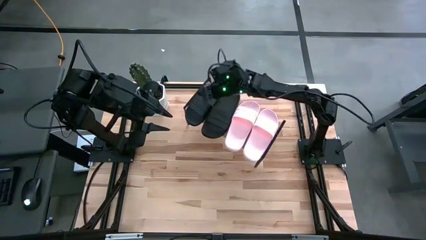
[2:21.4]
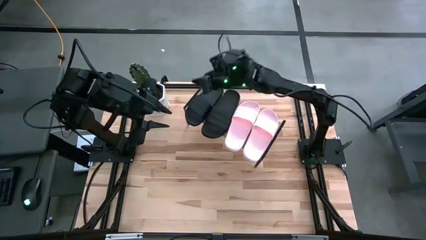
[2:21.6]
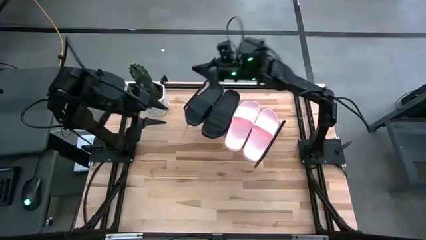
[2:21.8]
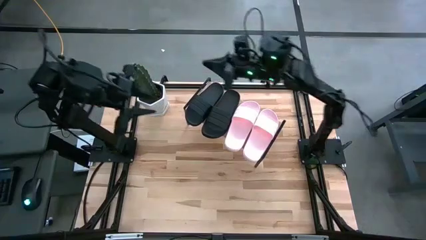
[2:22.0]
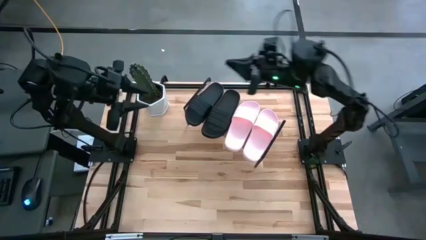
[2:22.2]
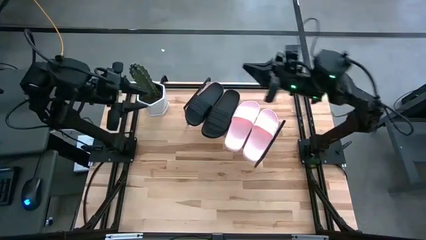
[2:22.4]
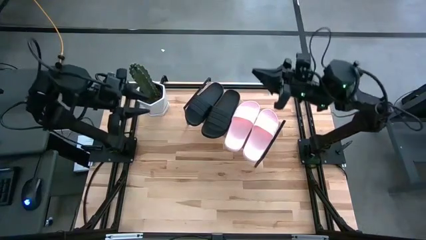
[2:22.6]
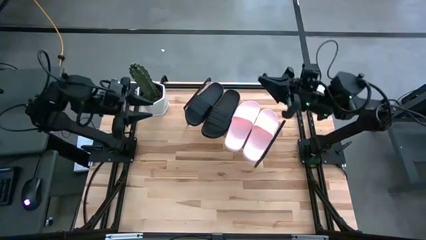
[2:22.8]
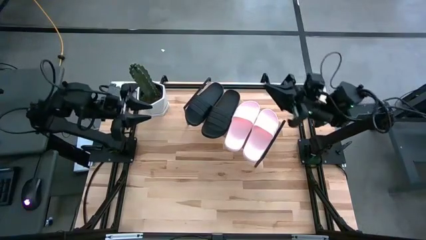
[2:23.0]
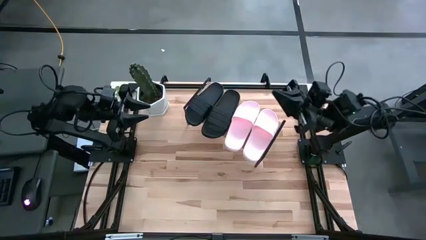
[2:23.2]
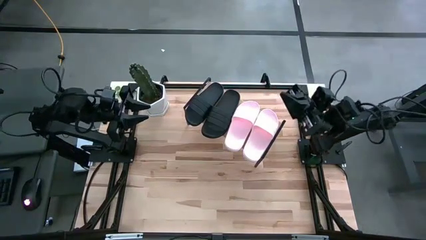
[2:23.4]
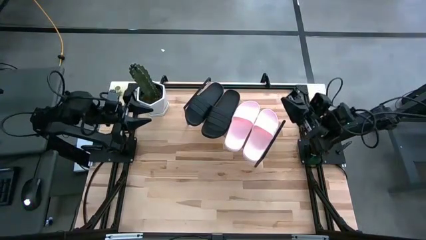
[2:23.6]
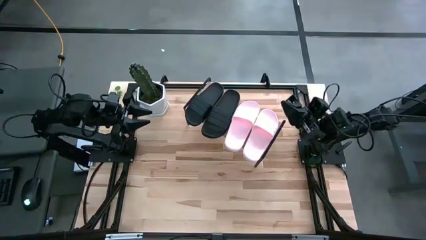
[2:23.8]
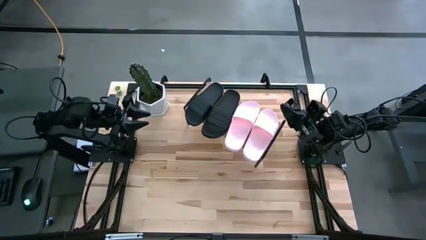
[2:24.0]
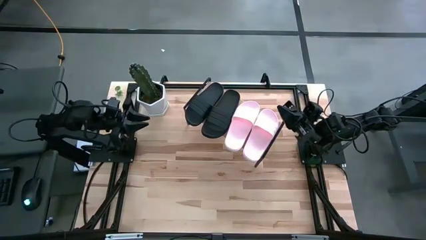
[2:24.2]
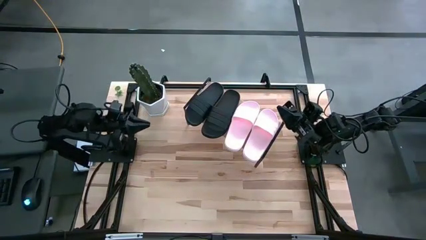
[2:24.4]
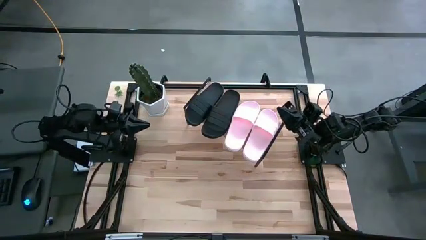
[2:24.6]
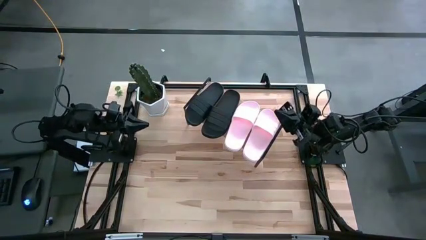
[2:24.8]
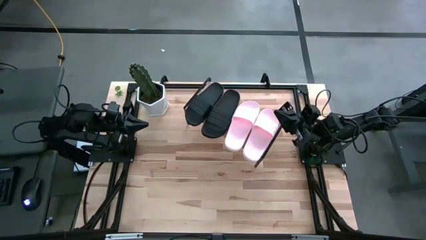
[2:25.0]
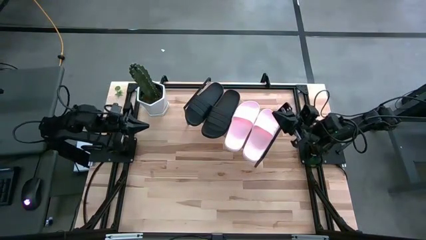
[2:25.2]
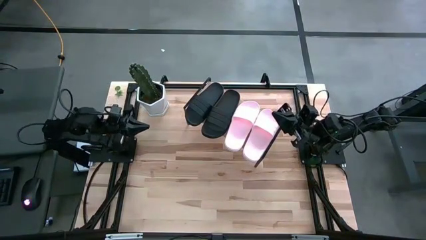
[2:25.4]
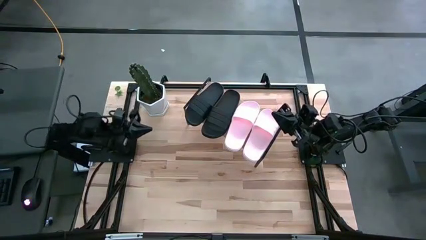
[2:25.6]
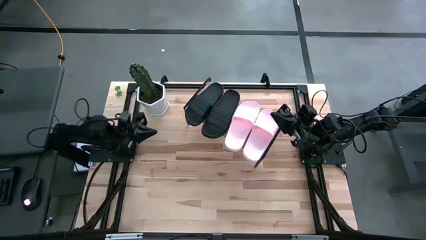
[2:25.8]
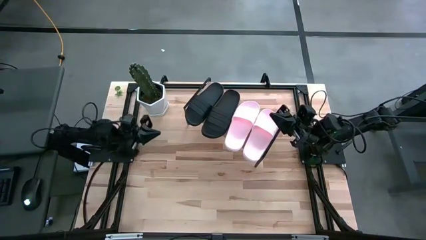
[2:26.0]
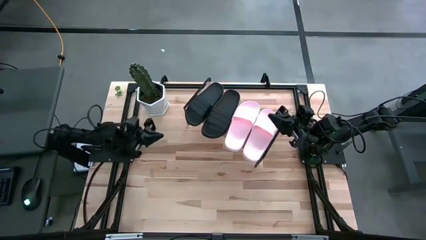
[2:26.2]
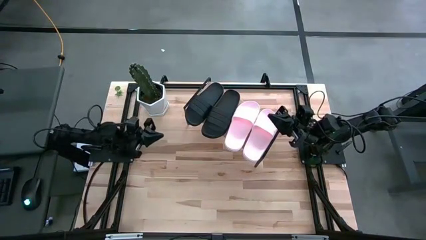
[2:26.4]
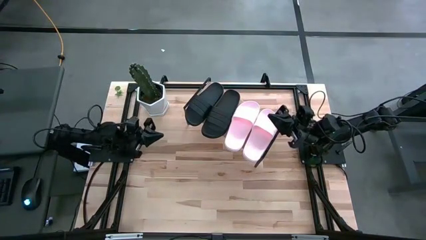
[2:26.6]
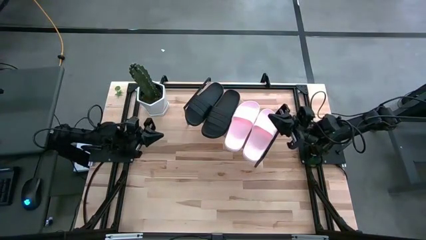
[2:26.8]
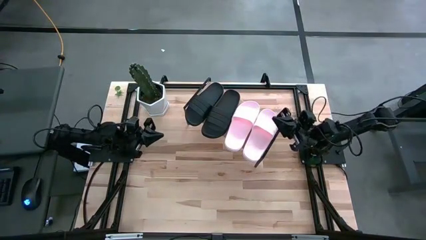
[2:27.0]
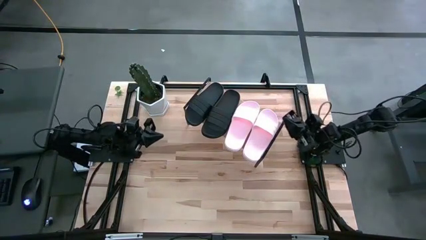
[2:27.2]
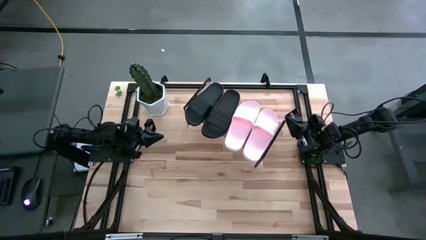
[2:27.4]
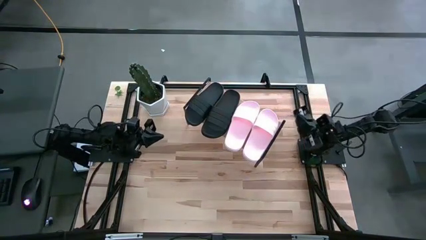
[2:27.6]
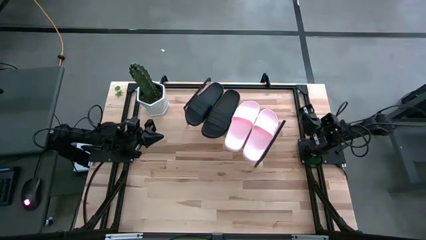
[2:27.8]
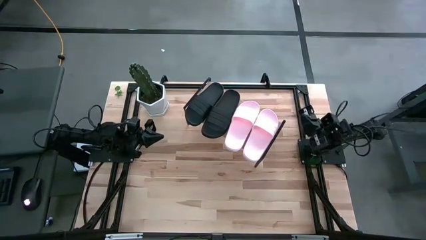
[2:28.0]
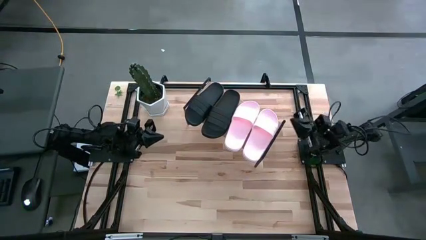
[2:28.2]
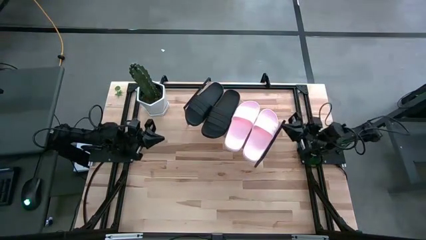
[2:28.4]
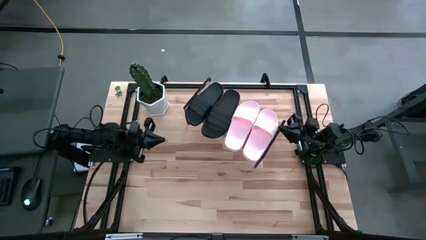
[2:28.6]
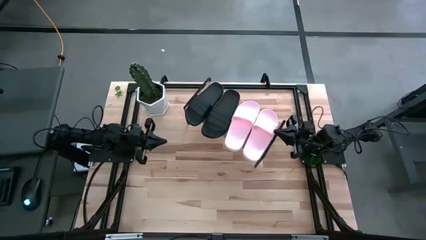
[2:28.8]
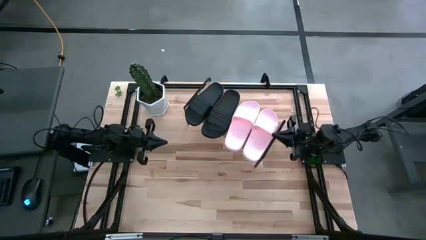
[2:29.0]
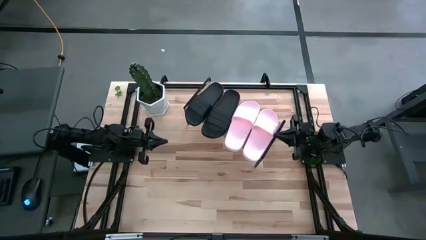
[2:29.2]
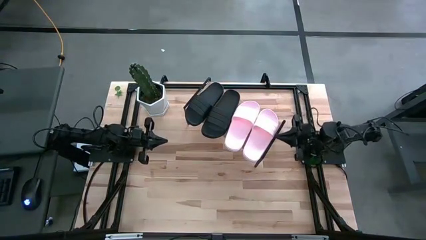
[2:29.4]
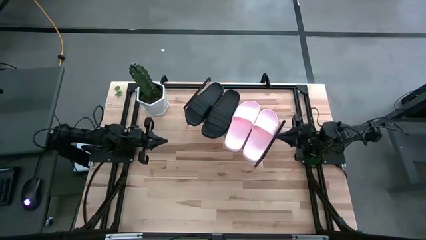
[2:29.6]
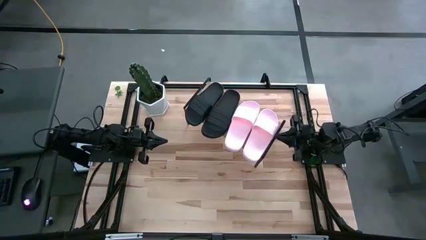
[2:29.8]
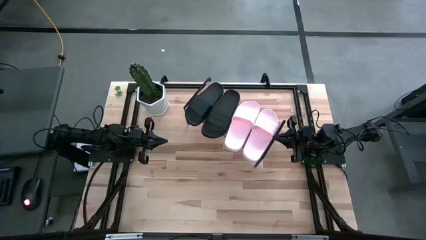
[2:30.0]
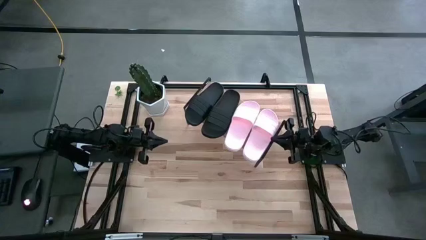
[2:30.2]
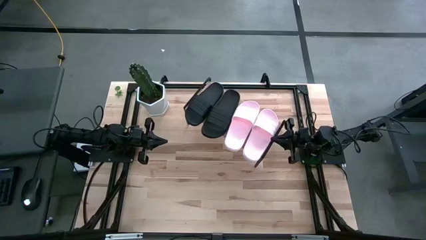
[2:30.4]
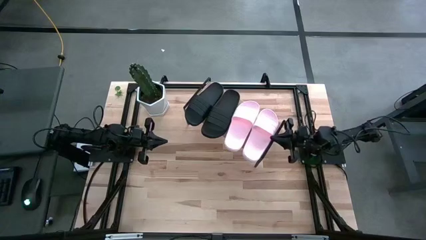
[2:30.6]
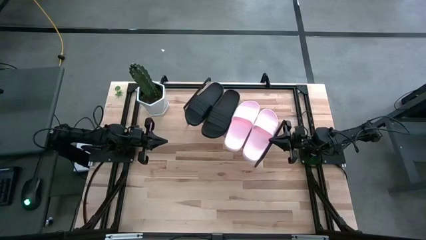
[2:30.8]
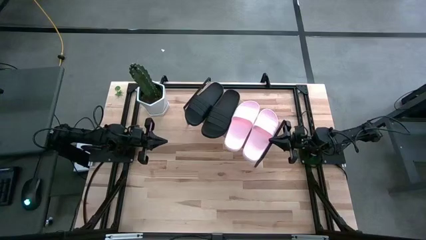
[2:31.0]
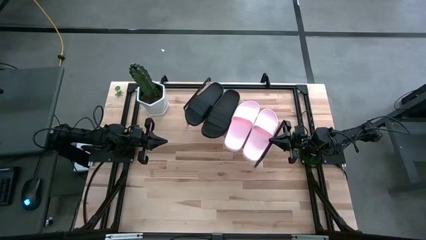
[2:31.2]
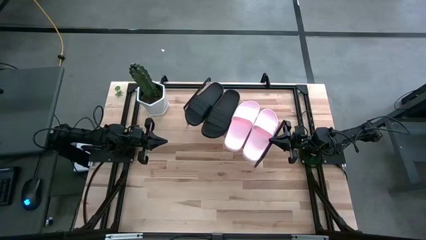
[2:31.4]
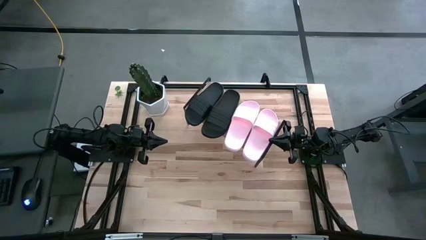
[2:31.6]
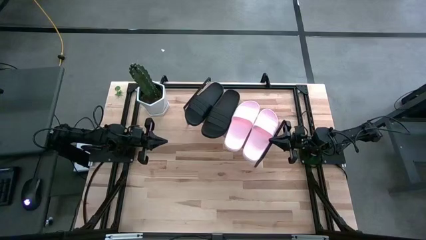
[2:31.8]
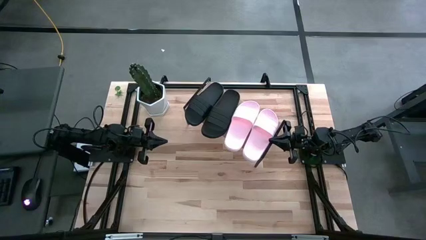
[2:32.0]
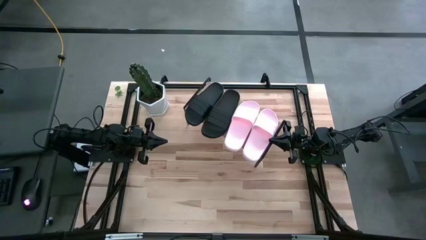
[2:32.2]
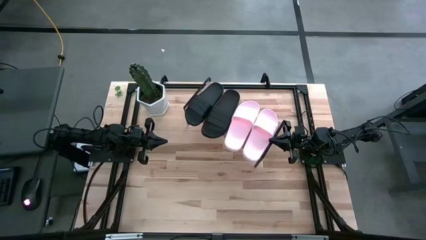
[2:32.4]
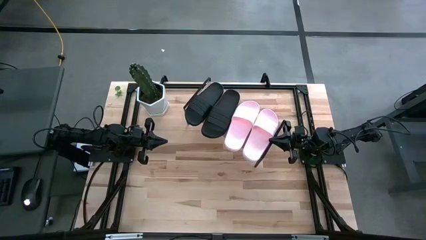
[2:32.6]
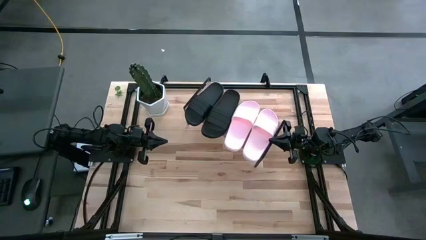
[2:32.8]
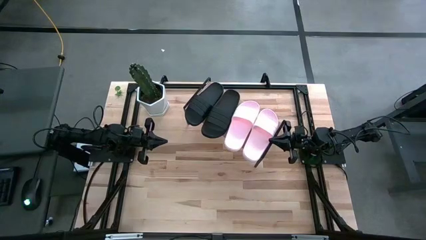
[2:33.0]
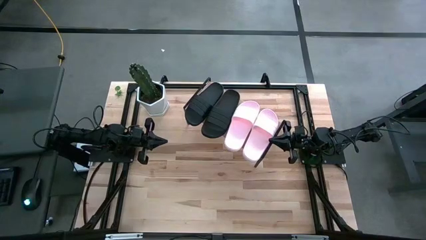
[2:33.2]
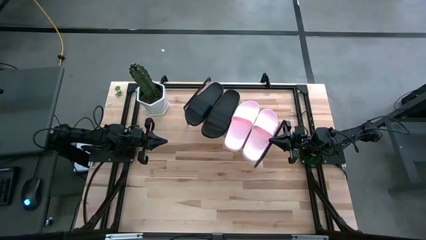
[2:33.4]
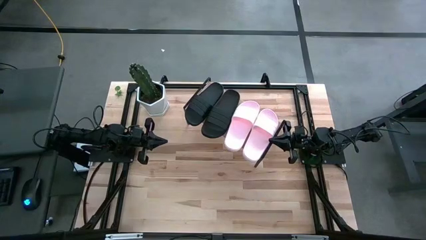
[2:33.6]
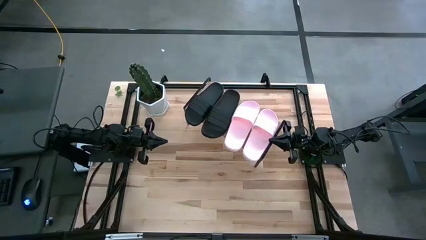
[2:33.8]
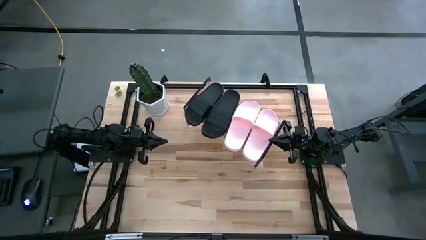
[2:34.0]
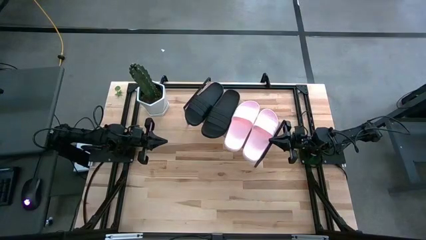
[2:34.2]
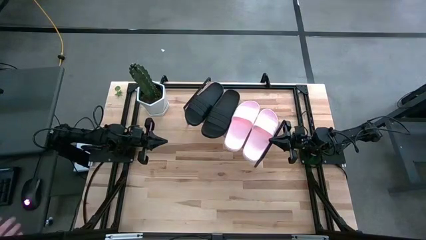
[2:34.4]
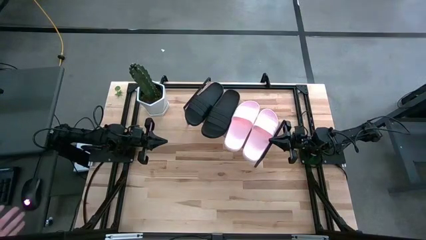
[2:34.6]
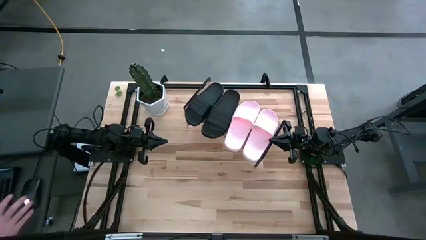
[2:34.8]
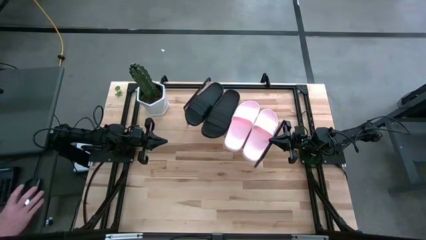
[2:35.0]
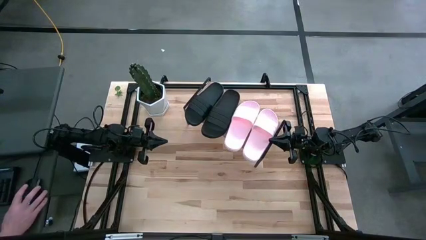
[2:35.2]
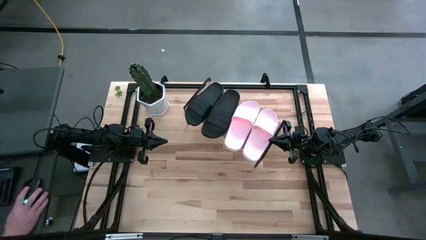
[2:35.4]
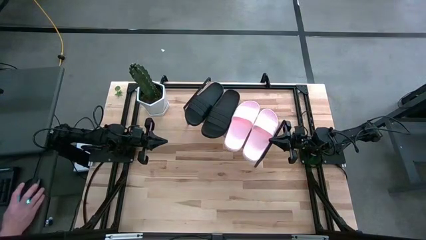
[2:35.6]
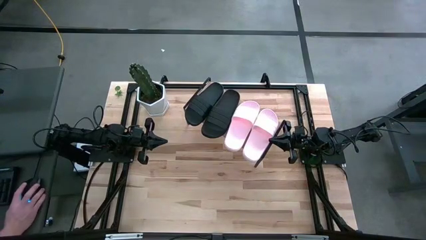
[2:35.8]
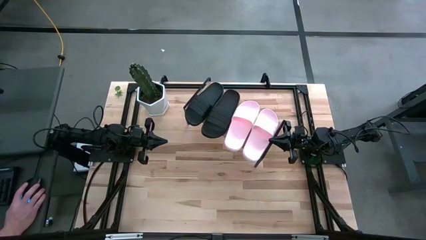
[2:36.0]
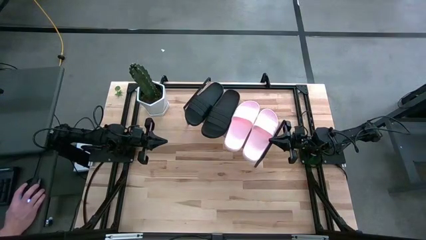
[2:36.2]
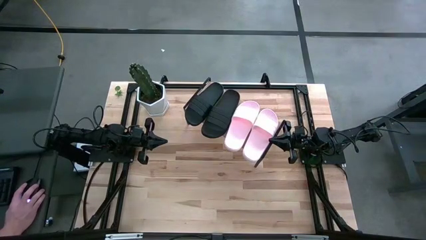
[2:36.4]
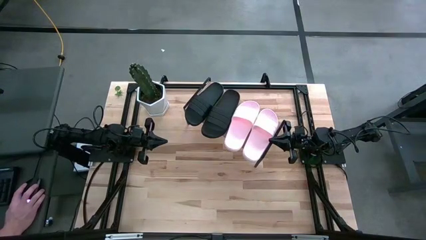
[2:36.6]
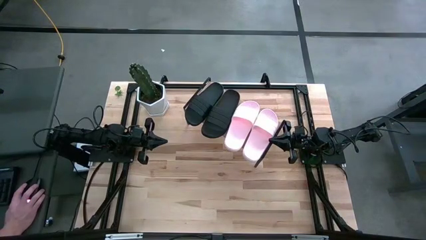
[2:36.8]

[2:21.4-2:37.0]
Task: Pick and place slides into the shelf
Return to Home Position
